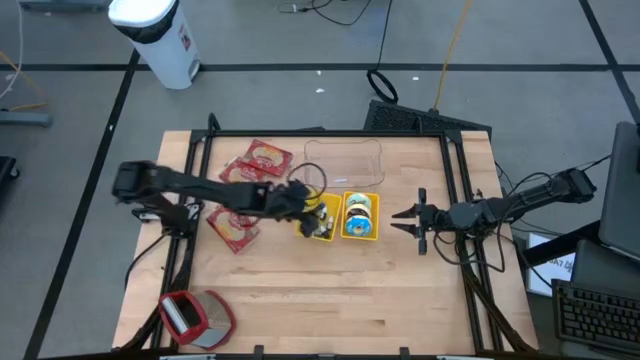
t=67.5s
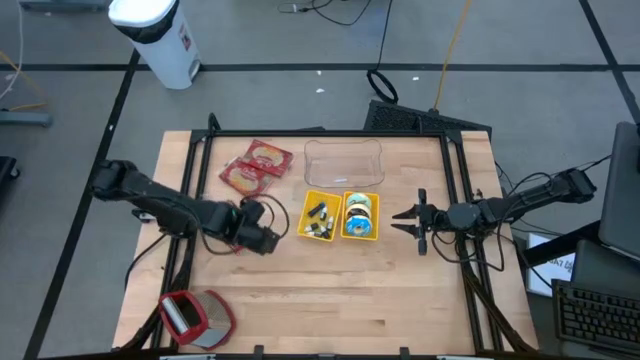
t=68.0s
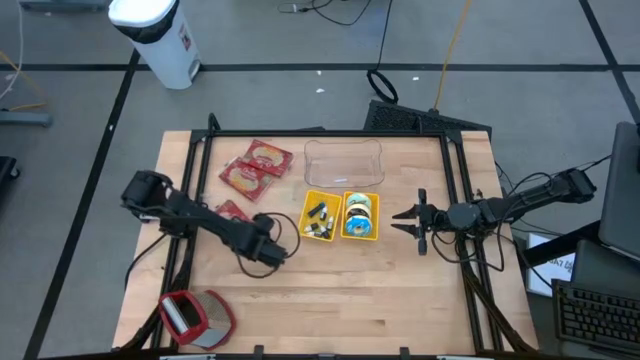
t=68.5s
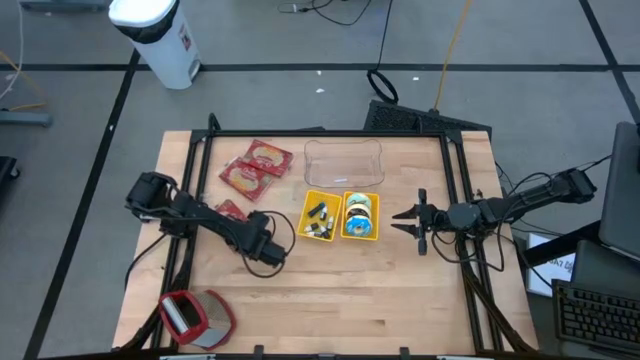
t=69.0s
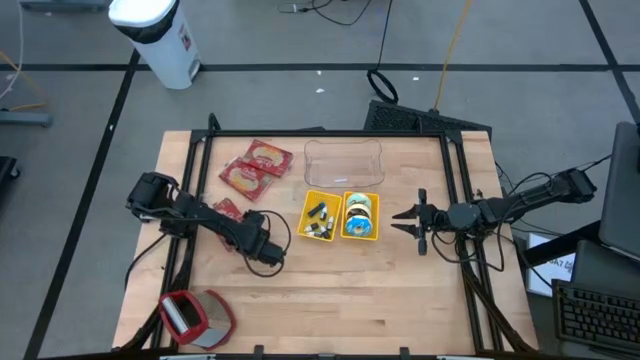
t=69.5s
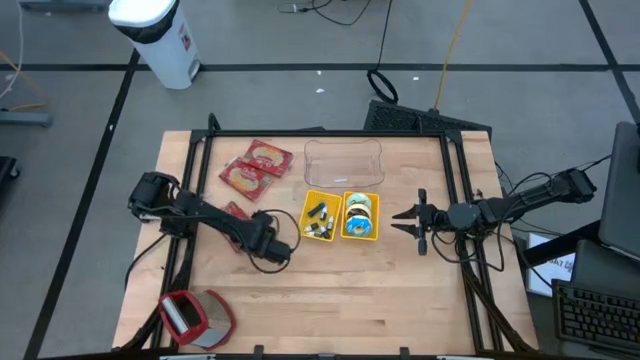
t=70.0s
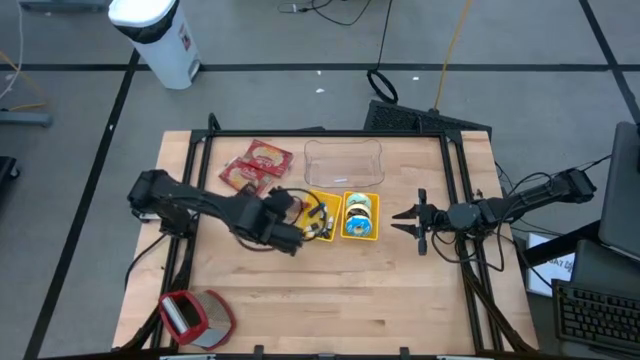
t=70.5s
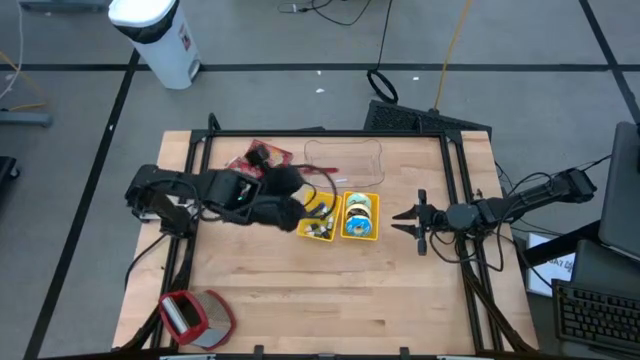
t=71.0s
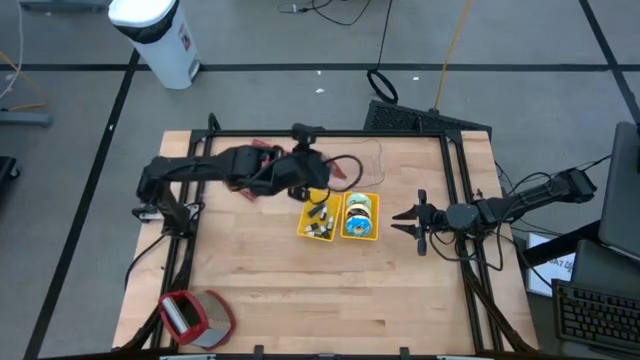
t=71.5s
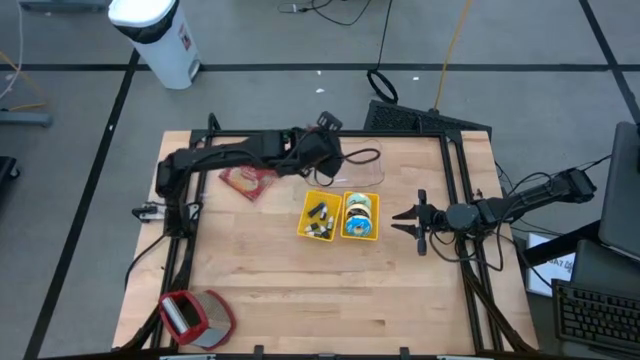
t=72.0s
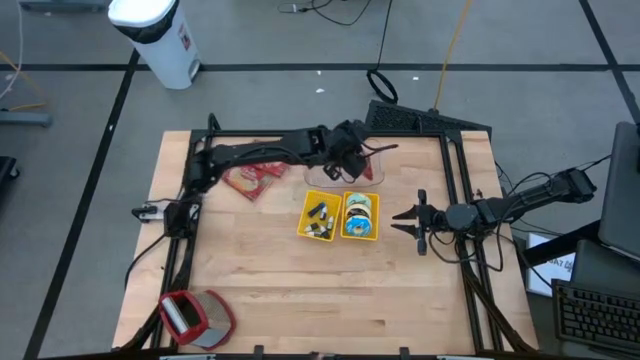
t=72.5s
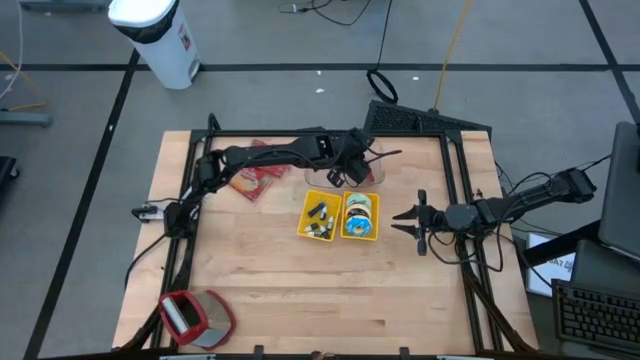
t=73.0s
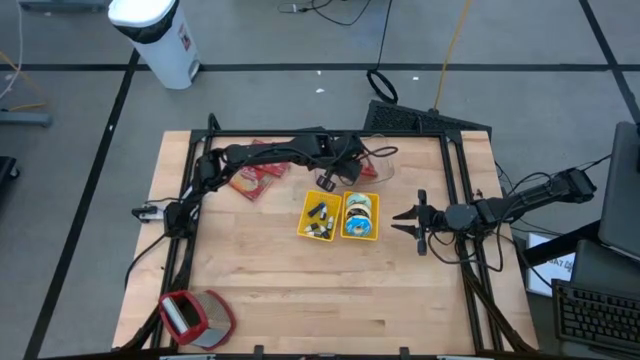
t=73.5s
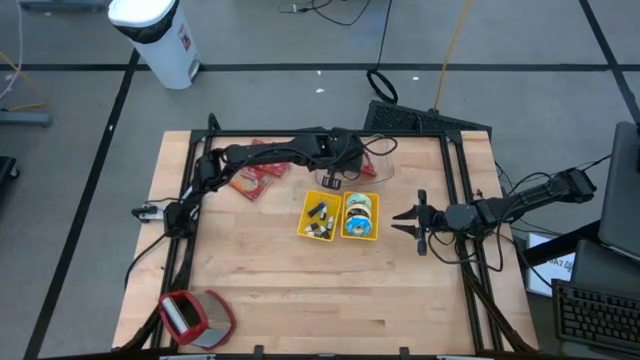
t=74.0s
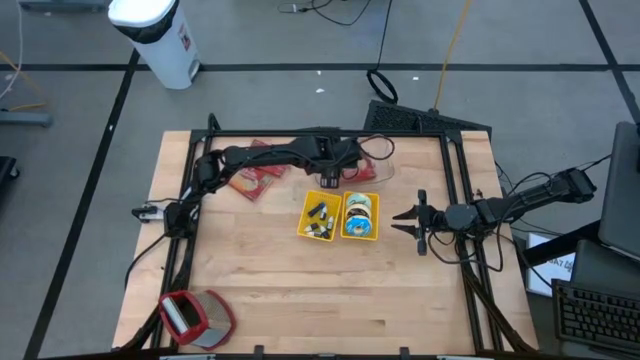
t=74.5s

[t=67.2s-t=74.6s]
Put the bottom red popcorn bag into the transparent bin

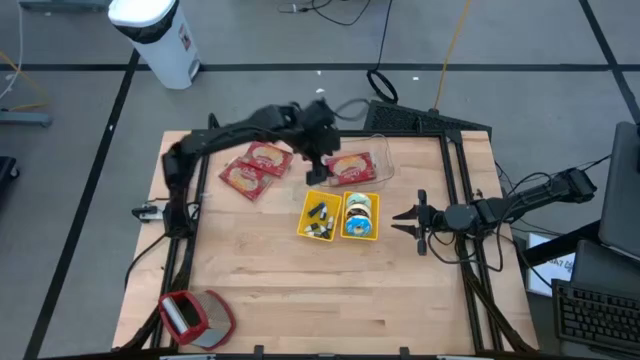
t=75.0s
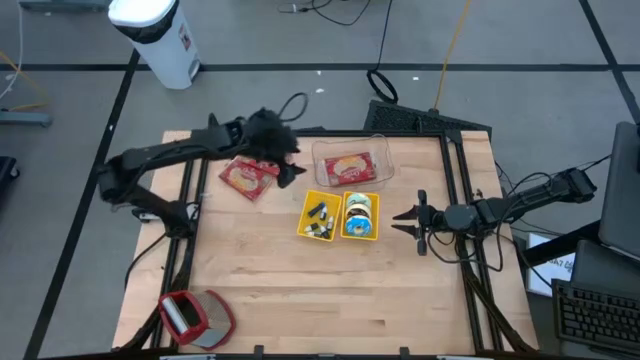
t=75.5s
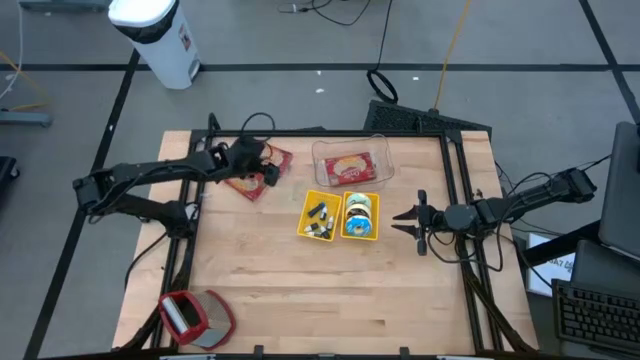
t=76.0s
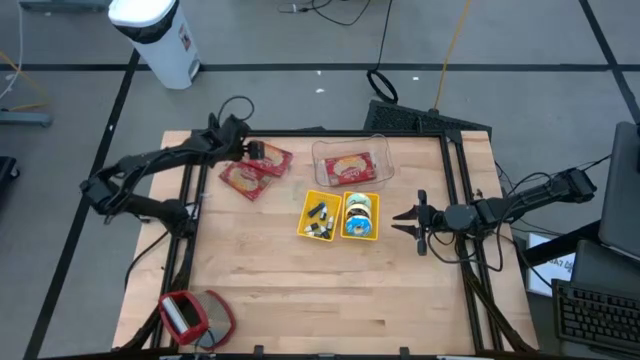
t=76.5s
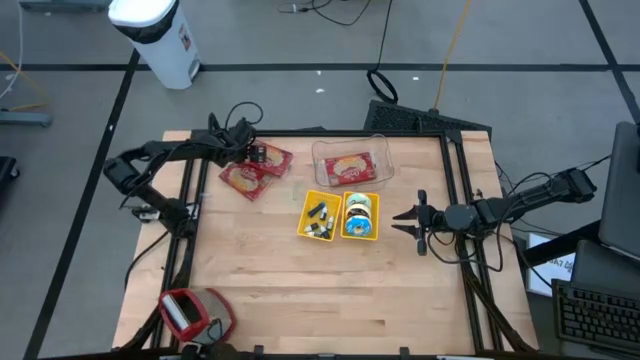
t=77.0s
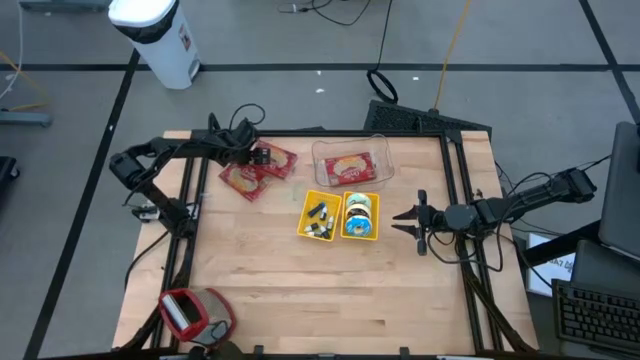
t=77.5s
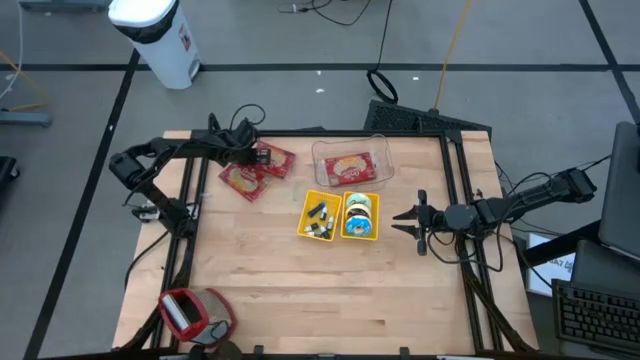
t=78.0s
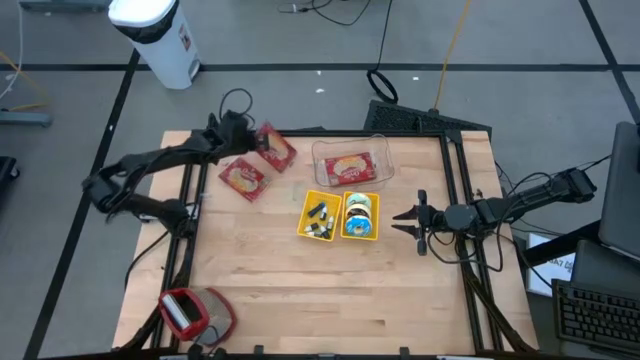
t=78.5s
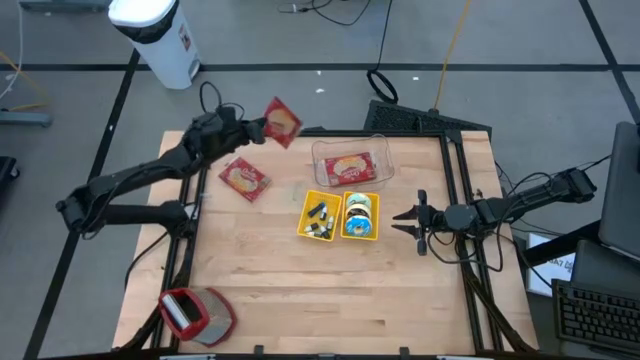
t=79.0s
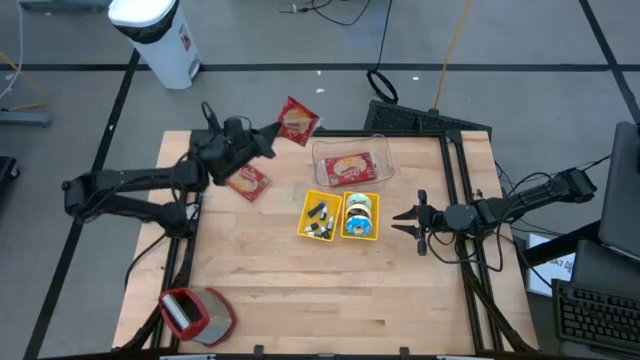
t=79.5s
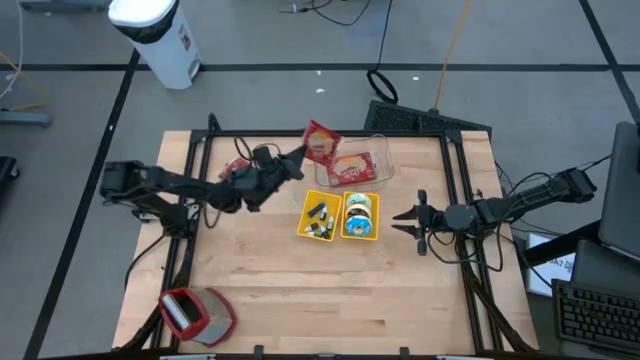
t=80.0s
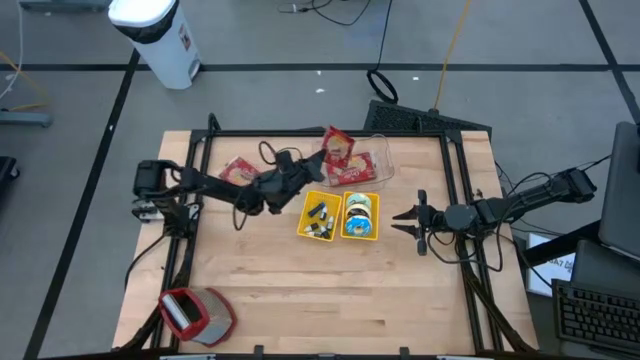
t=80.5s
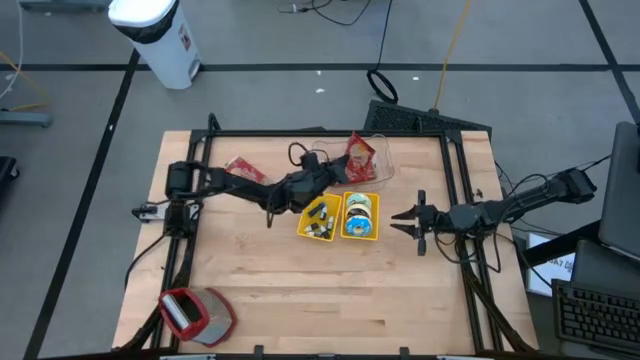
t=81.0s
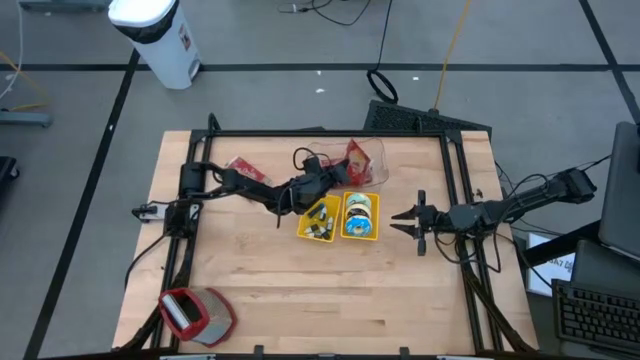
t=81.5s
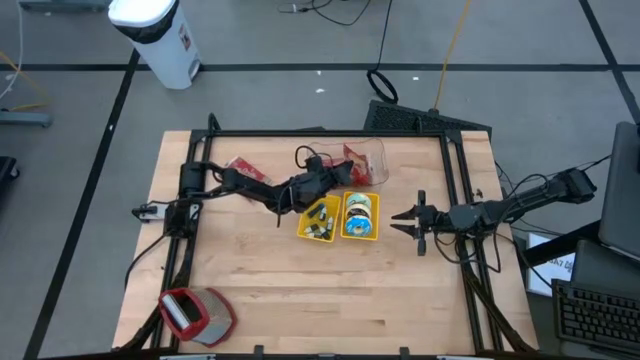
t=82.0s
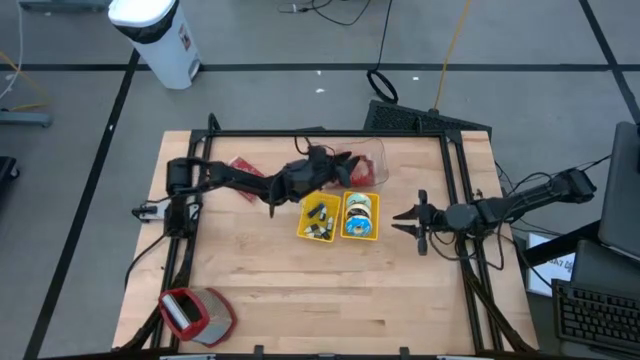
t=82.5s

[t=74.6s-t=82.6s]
Put the top red popcorn bag into the transparent bin

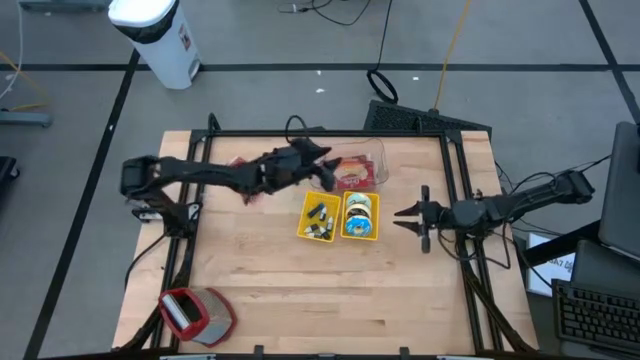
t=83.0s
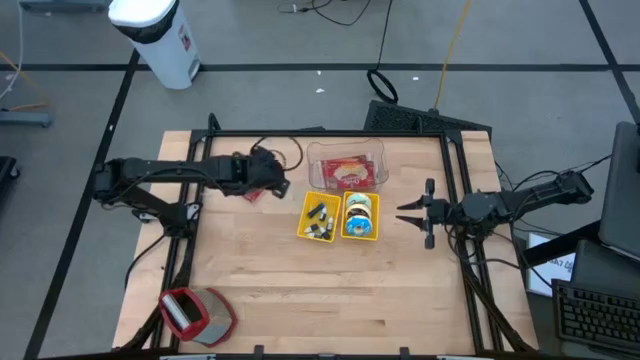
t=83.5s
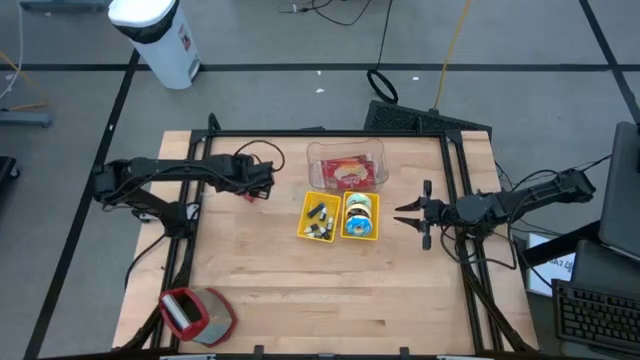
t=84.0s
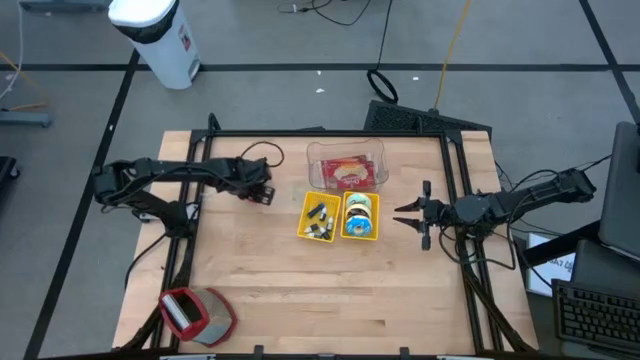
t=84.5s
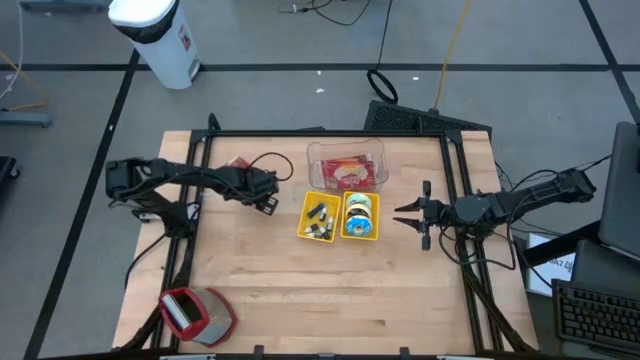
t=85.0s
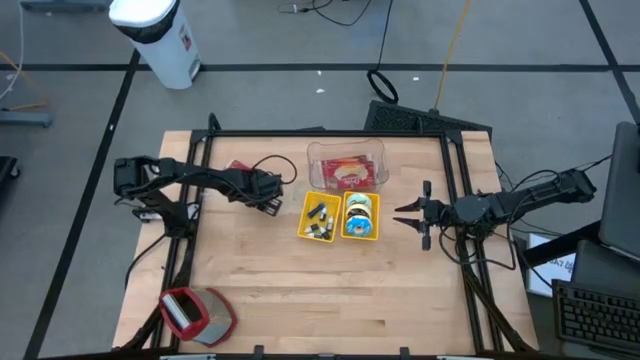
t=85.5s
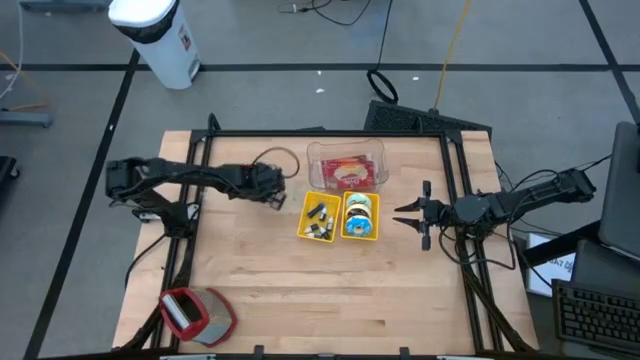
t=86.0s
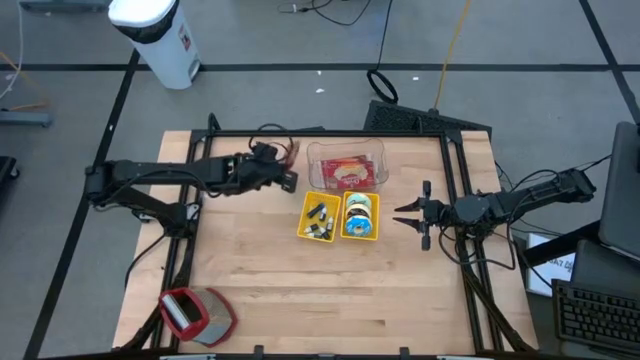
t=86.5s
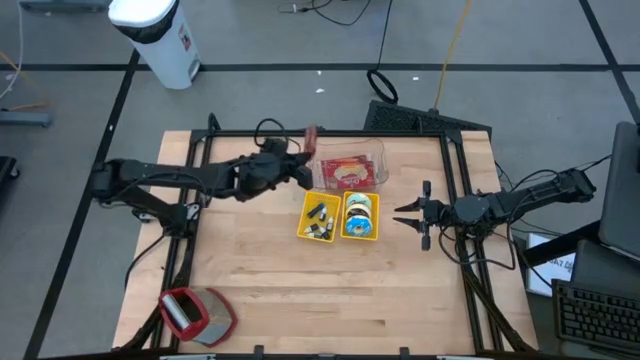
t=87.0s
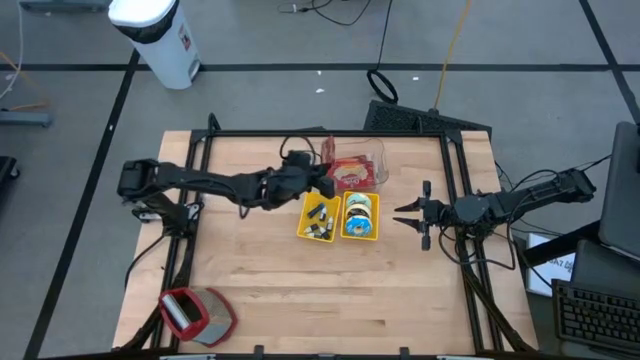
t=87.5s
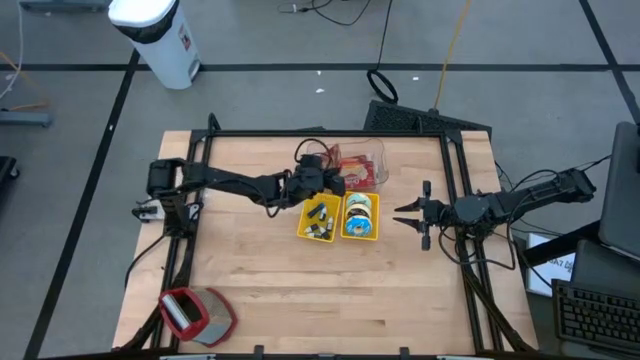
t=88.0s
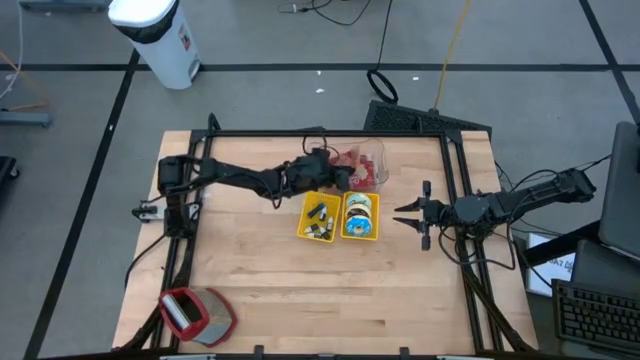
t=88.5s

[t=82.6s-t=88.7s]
Put the red popcorn bag into the transparent bin
